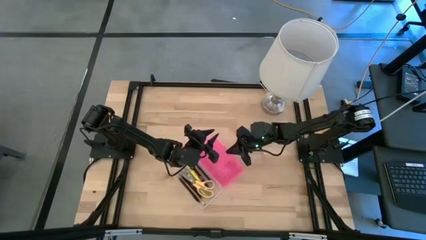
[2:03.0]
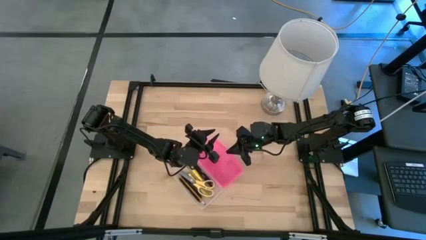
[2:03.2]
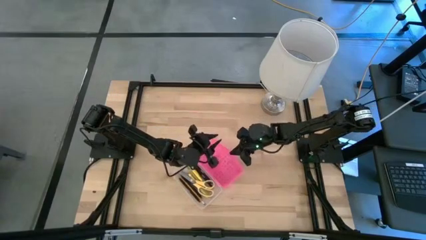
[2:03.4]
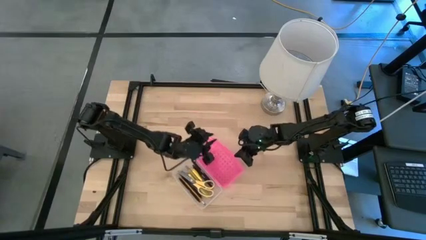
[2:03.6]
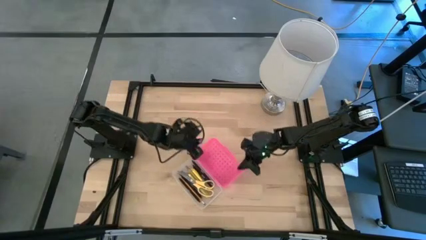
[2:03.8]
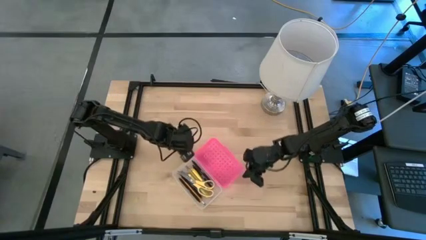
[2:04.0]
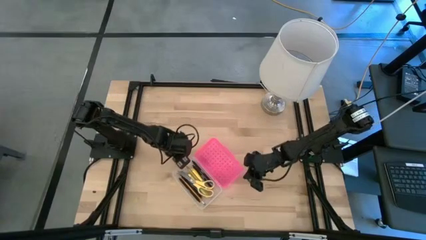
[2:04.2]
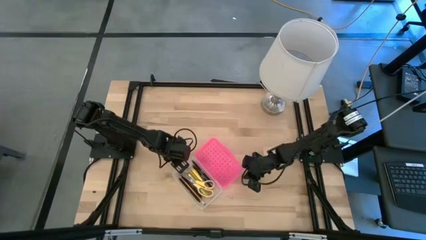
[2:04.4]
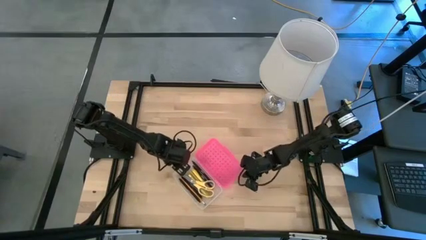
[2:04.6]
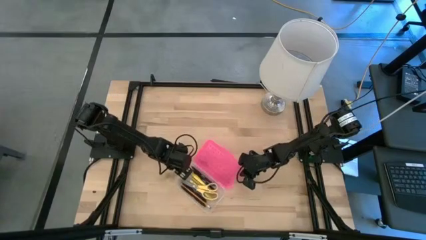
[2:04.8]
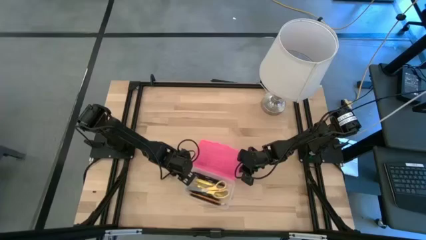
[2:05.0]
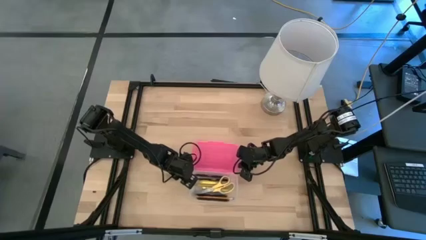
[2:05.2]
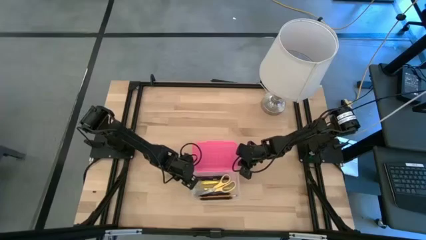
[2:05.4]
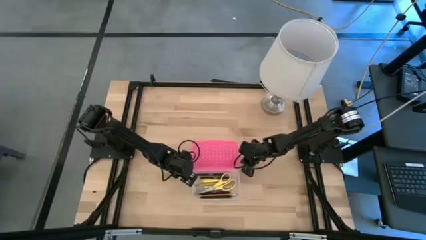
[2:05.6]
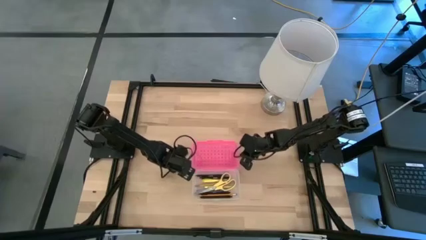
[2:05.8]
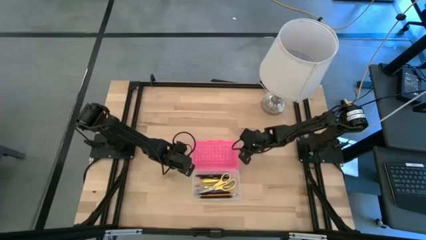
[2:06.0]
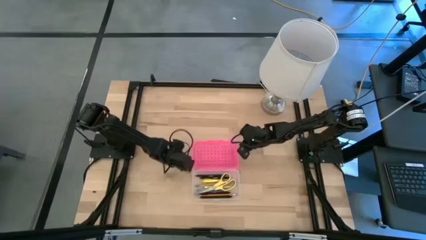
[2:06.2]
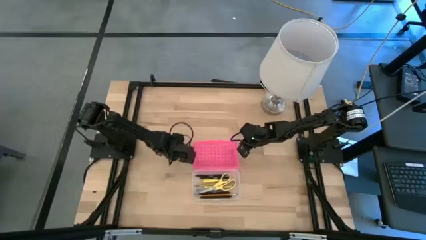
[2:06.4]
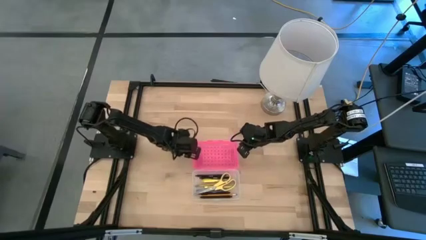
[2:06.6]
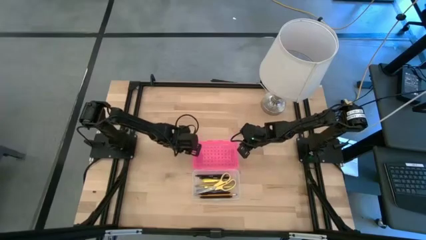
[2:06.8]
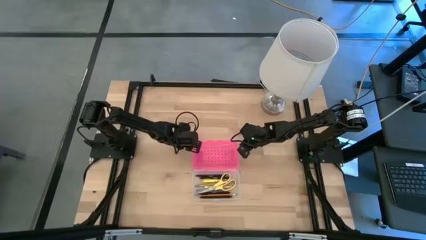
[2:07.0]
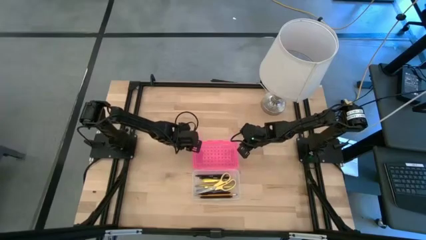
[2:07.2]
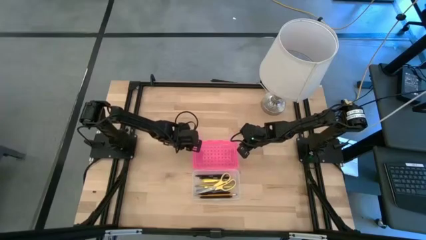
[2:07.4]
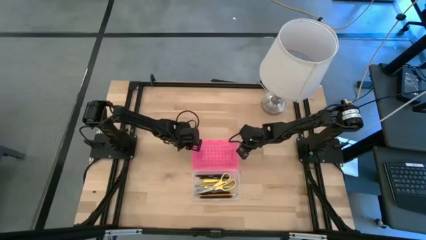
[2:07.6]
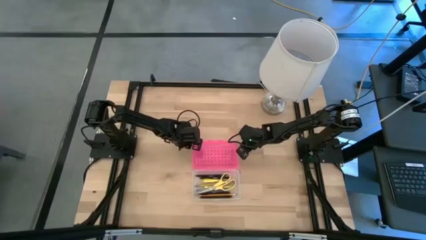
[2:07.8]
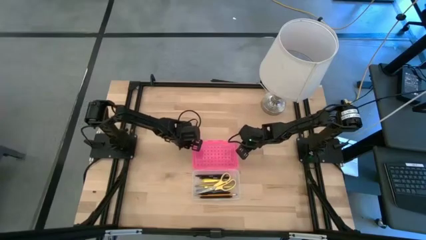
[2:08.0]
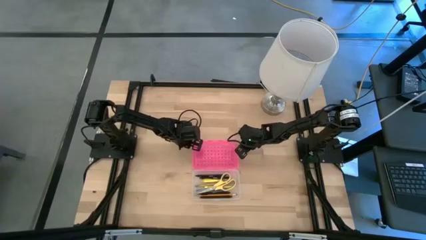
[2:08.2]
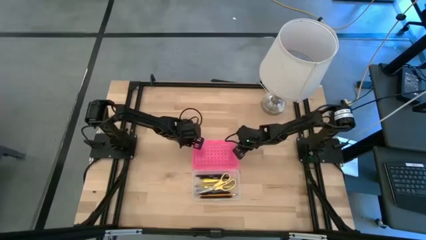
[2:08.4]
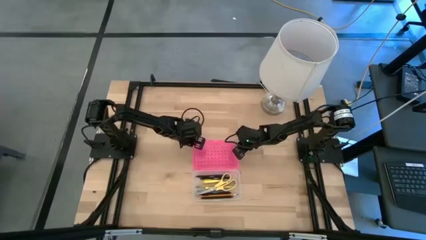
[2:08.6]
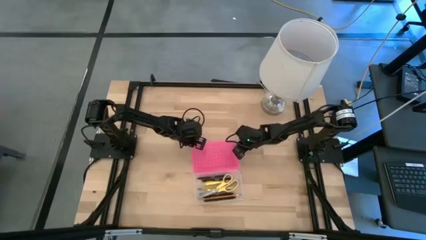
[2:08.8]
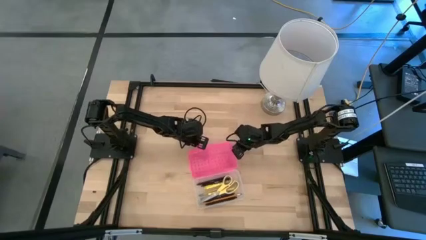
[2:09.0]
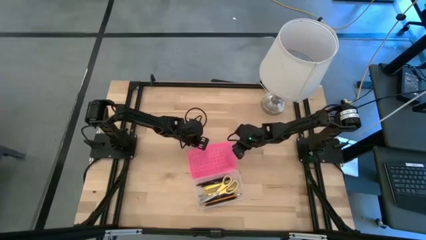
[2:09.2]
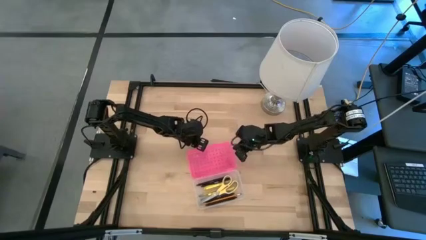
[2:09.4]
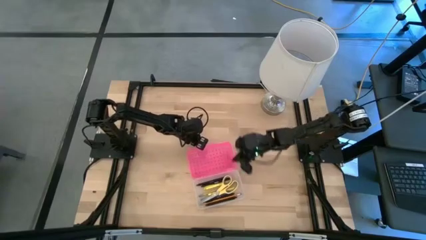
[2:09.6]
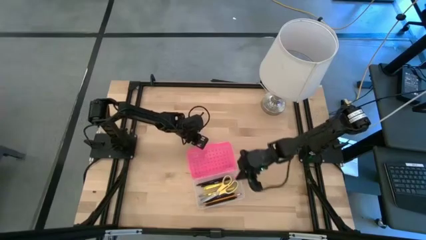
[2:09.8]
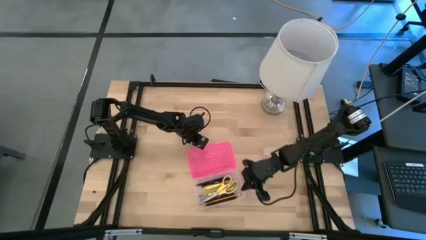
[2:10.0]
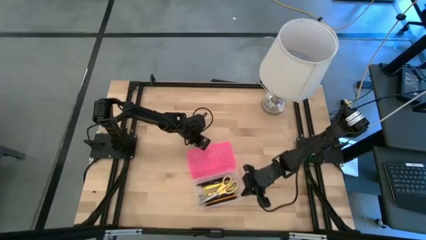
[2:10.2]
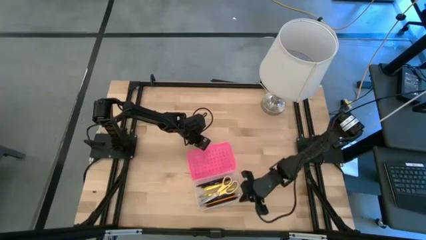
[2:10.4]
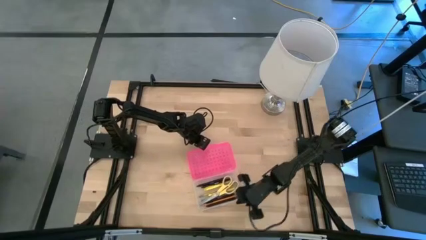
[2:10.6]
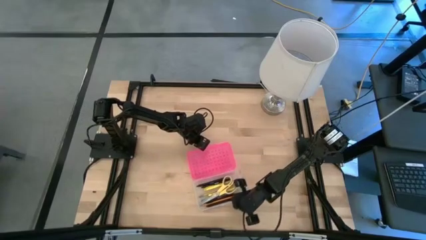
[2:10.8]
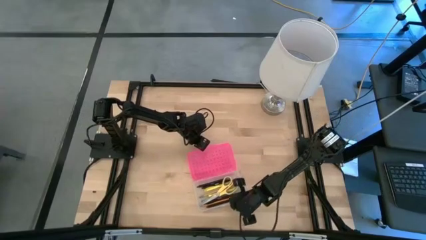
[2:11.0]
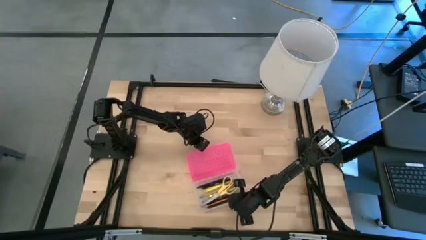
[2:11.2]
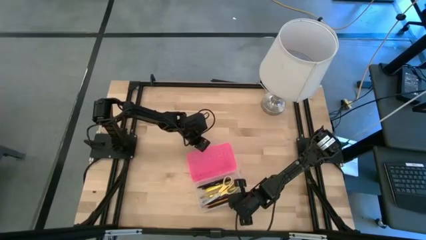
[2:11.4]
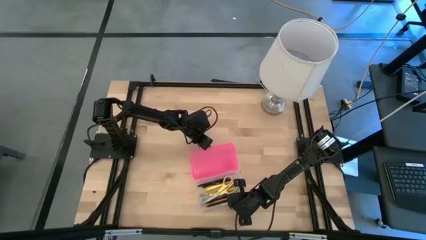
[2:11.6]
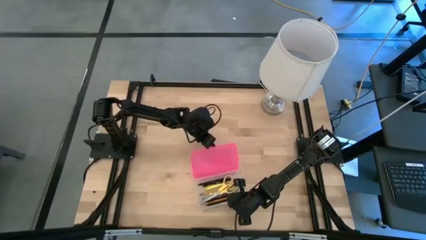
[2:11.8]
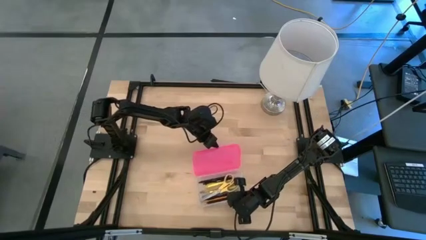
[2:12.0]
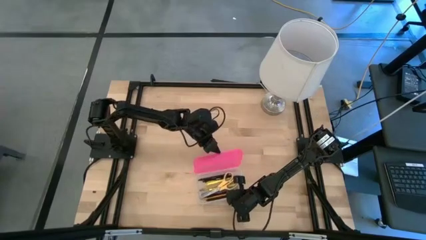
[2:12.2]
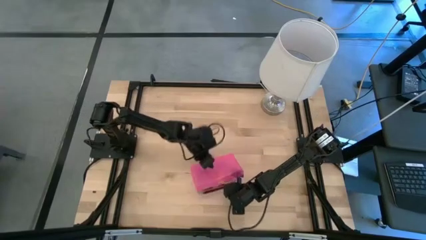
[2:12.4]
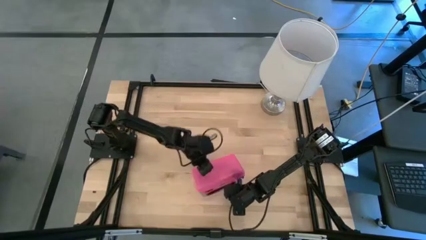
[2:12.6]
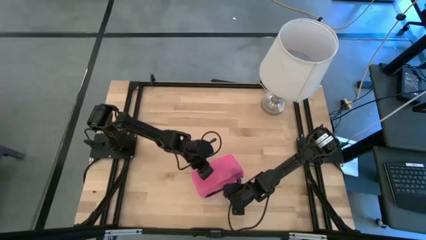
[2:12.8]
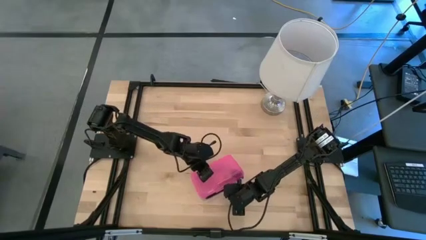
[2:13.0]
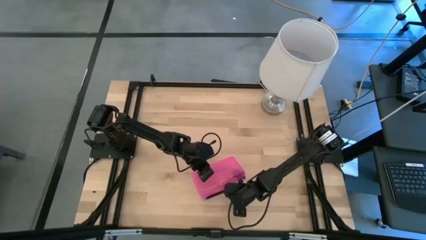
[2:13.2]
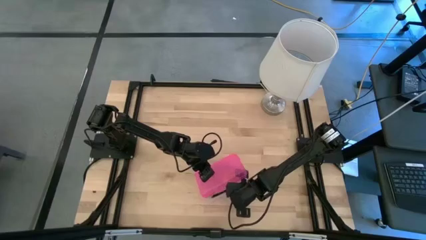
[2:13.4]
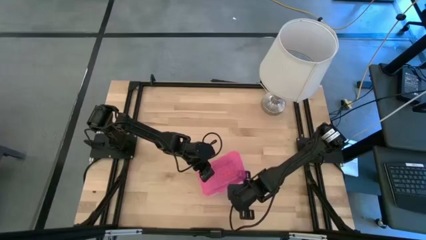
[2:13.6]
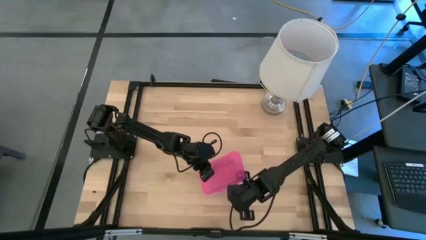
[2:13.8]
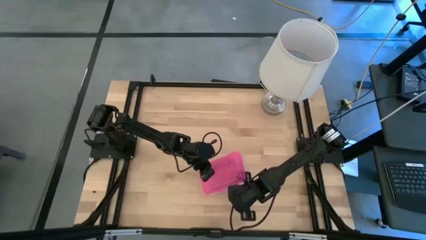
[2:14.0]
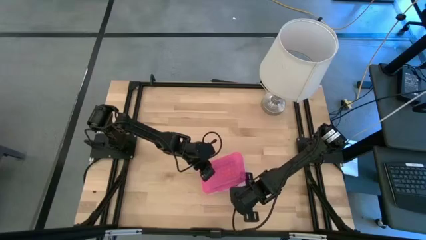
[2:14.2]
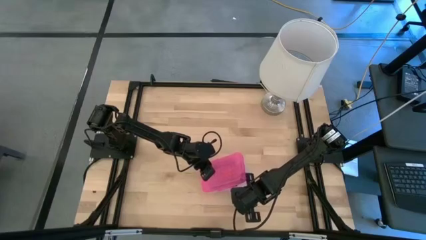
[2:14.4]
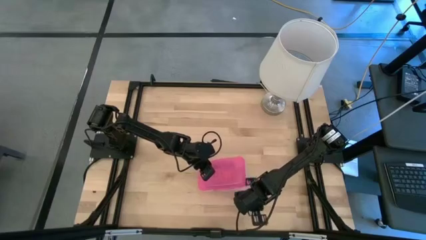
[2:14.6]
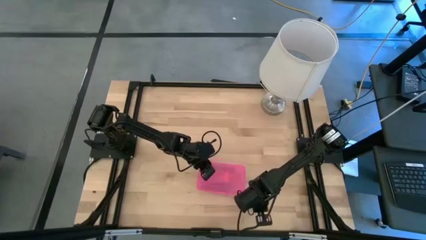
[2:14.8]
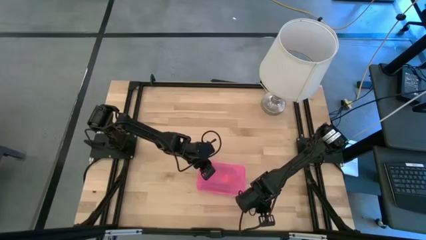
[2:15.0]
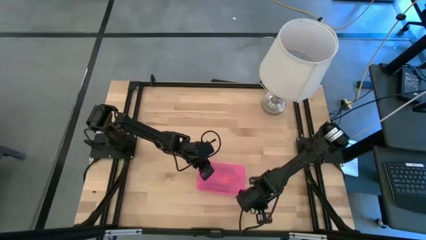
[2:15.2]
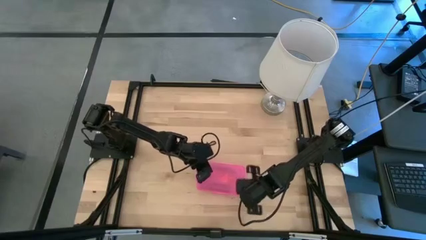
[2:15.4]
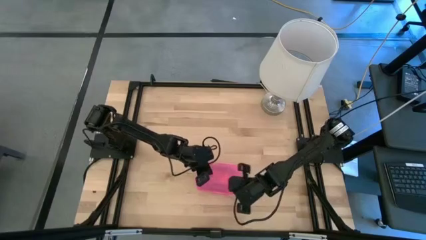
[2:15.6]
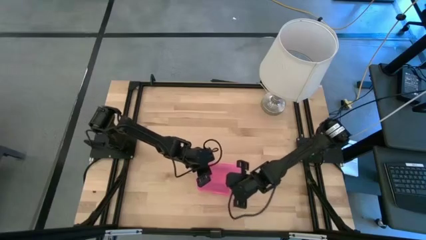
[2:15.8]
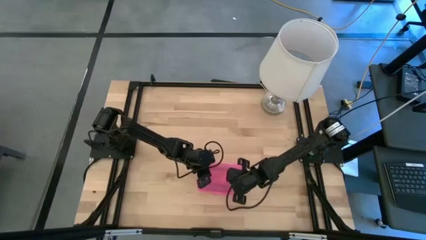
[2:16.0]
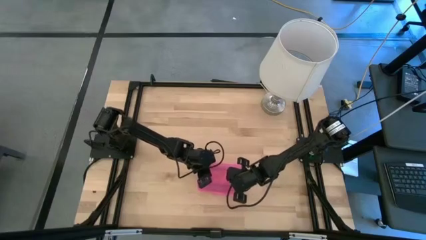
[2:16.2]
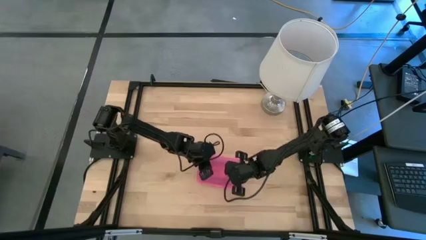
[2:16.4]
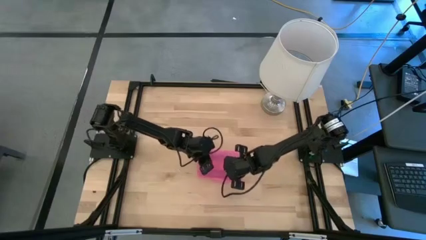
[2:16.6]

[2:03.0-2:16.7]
Task: Pick & place school supplies into a supply box
Close the pink supply box

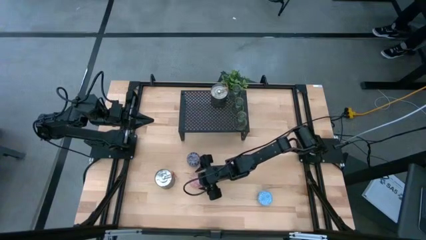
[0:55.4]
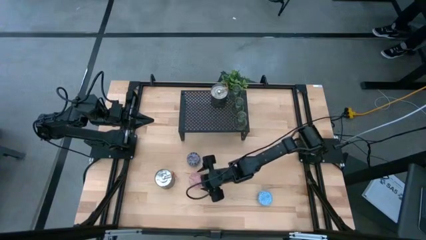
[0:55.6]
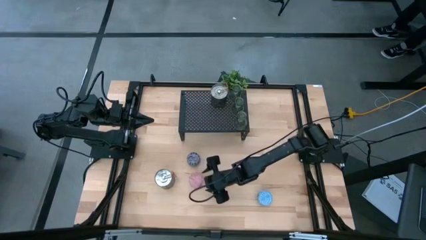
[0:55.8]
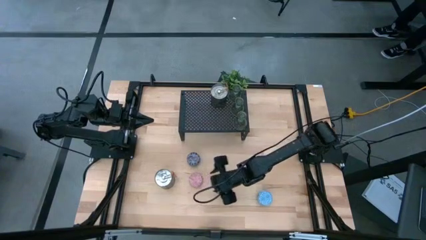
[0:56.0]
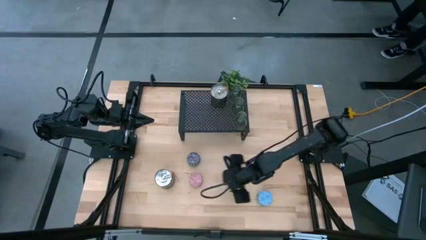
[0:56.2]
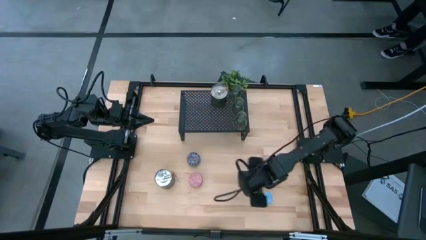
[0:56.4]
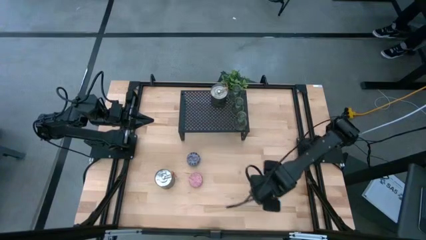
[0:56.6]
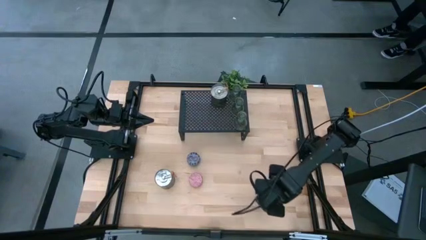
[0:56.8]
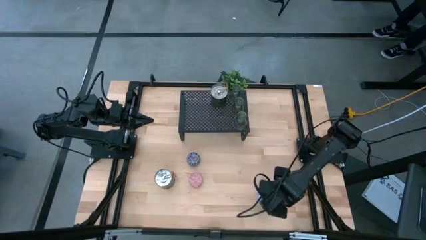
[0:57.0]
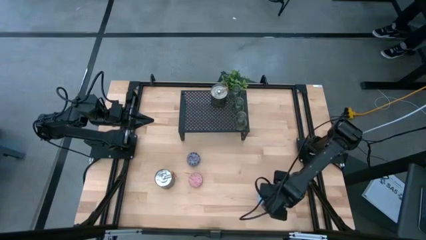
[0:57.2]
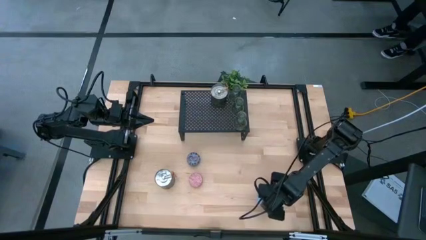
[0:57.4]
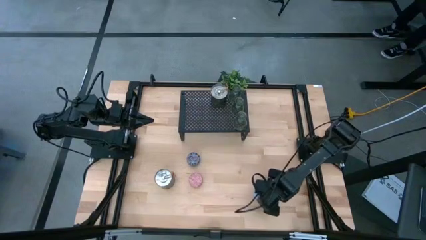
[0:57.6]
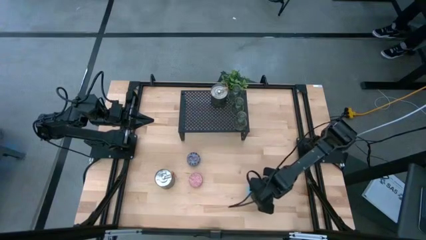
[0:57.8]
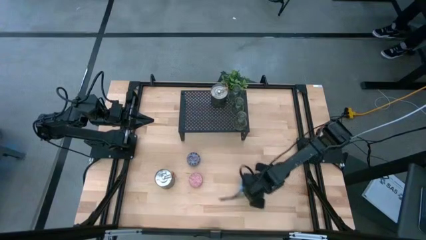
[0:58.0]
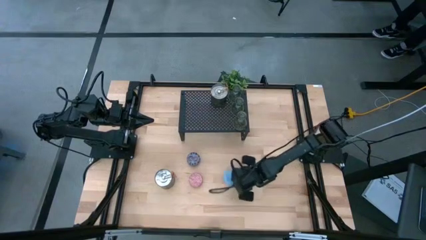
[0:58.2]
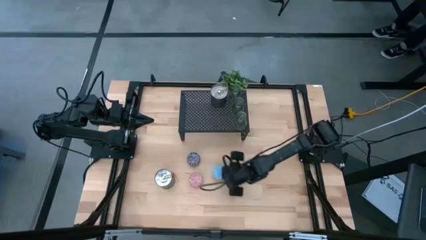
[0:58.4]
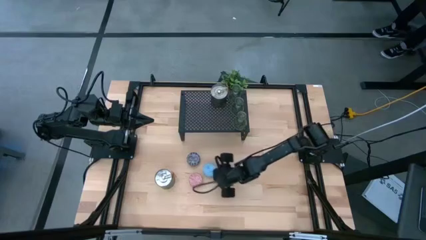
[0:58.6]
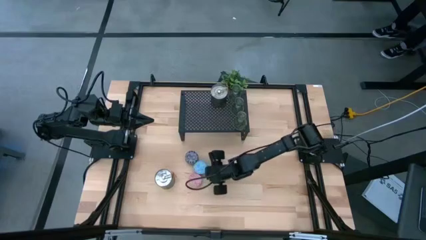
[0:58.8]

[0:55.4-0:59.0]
Task: Pick & Place candle stick holders
Move the blue patterned scented candle to the center of the table
